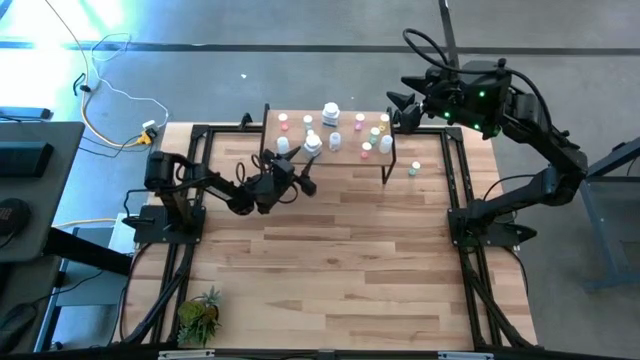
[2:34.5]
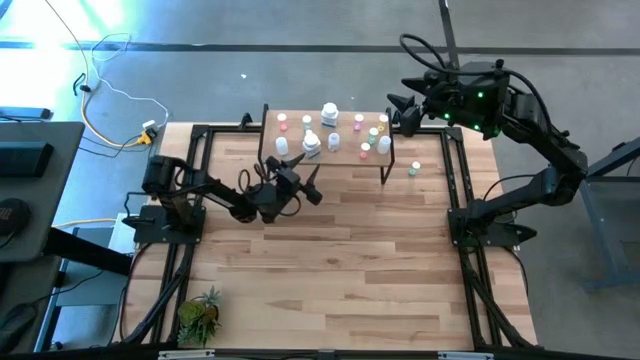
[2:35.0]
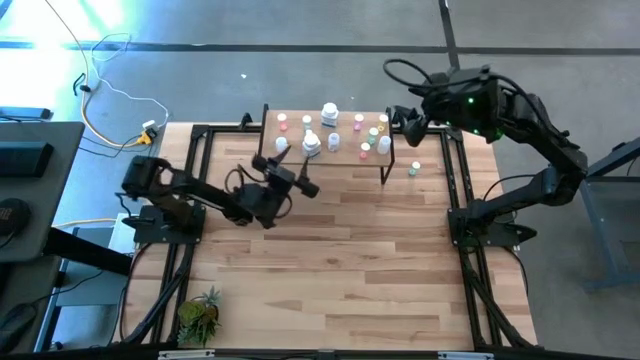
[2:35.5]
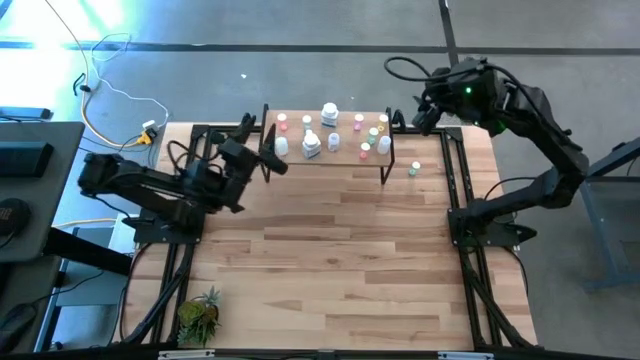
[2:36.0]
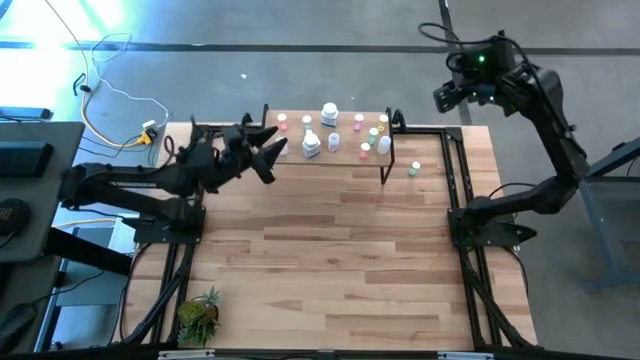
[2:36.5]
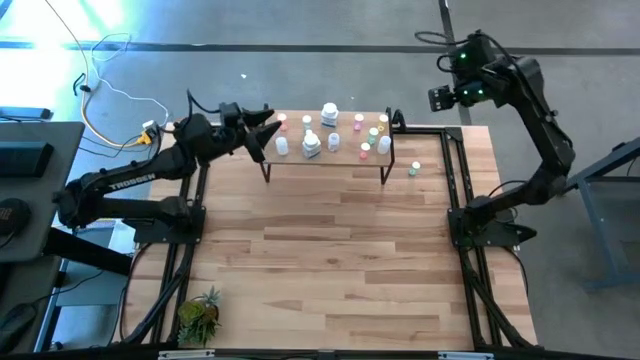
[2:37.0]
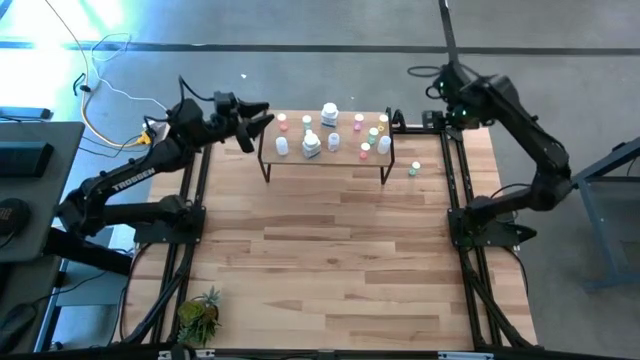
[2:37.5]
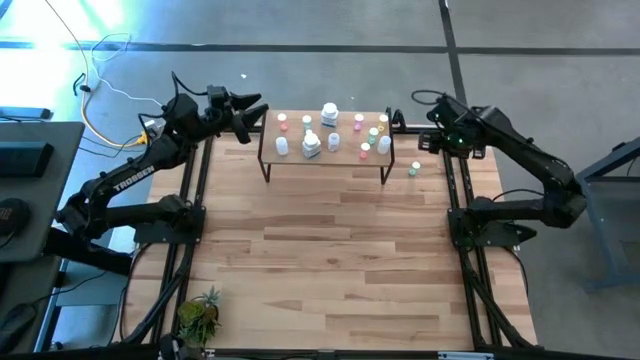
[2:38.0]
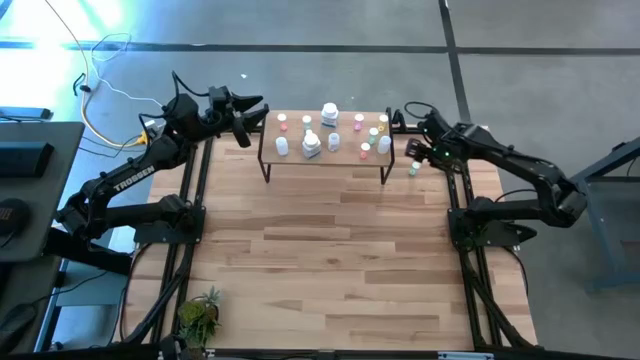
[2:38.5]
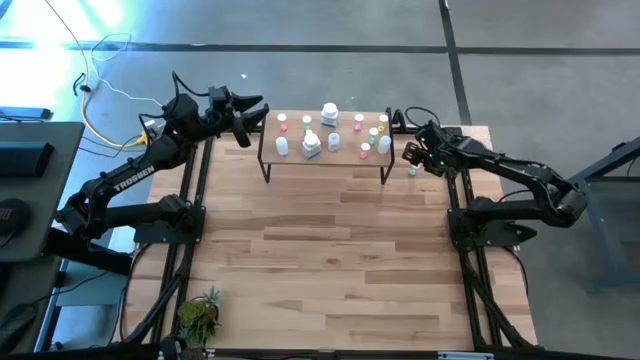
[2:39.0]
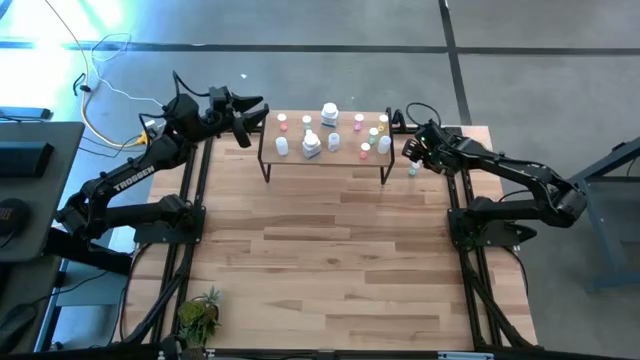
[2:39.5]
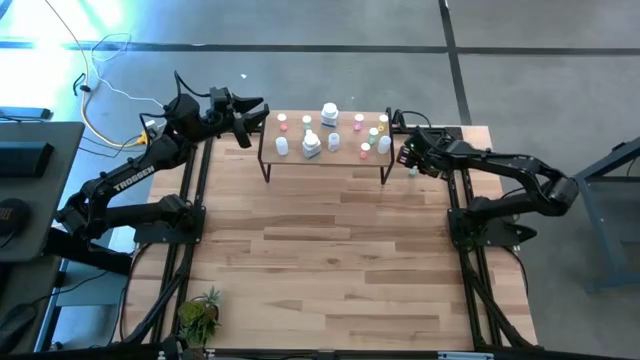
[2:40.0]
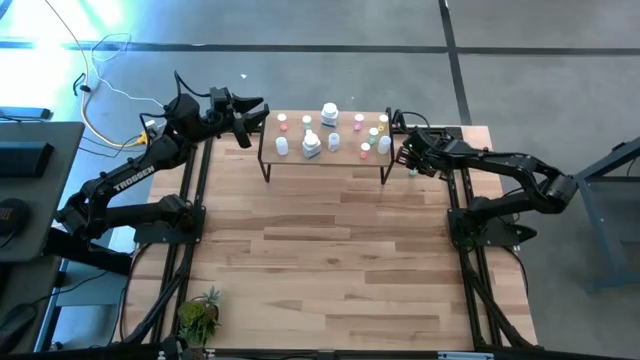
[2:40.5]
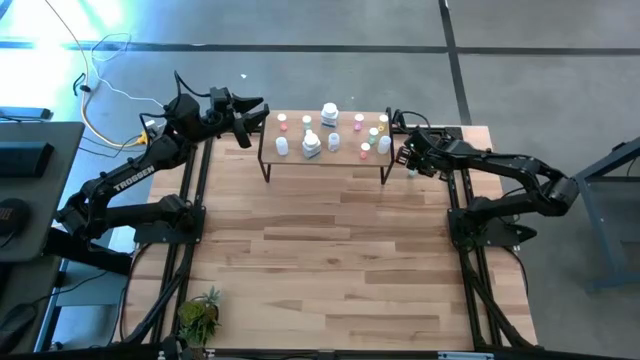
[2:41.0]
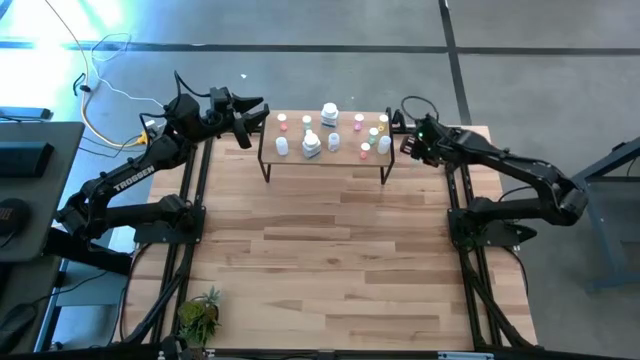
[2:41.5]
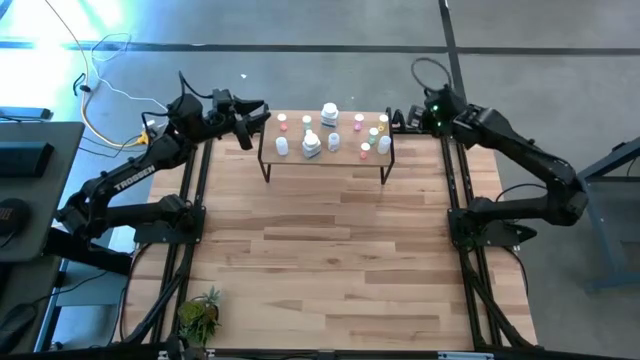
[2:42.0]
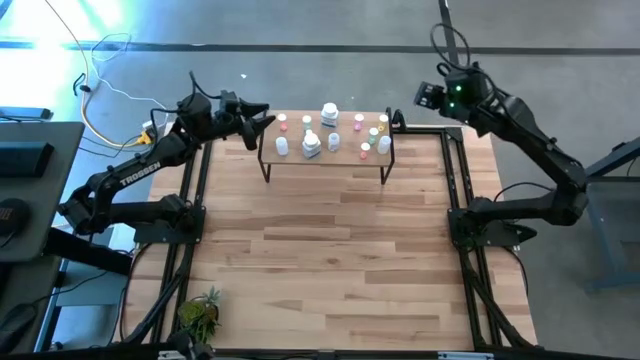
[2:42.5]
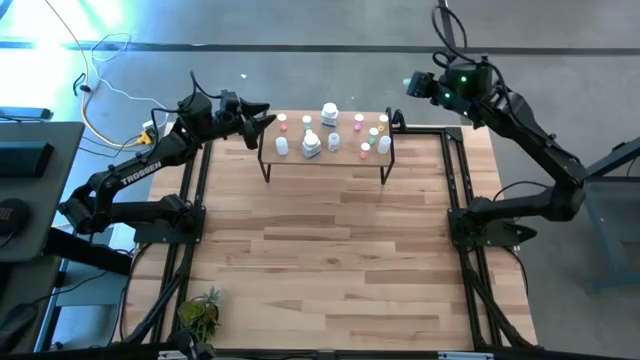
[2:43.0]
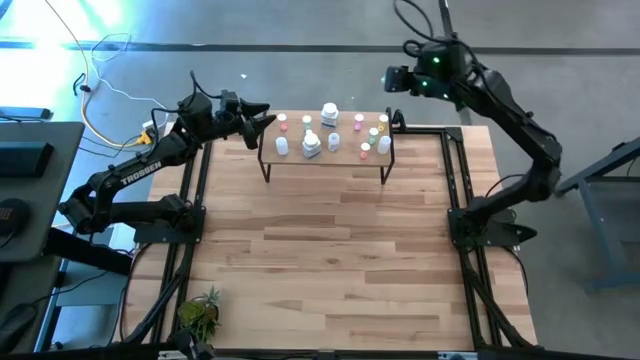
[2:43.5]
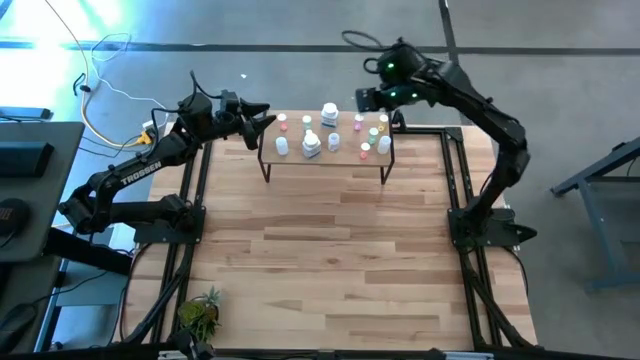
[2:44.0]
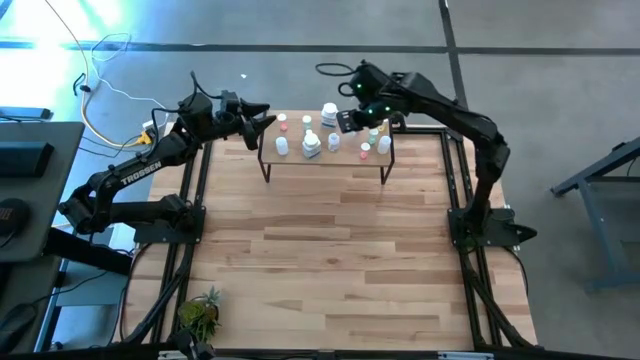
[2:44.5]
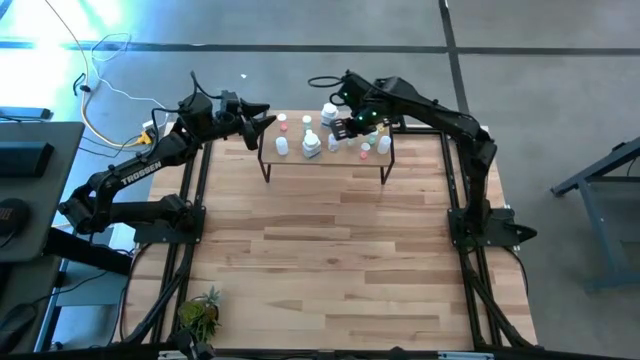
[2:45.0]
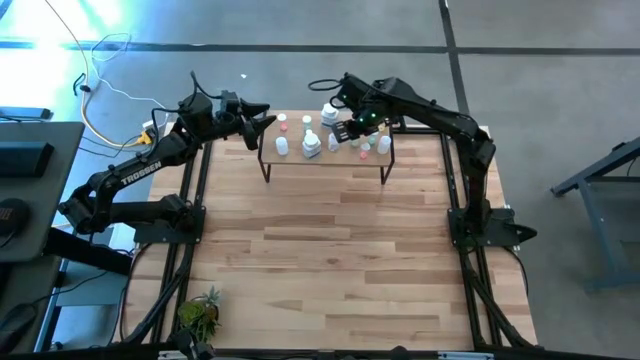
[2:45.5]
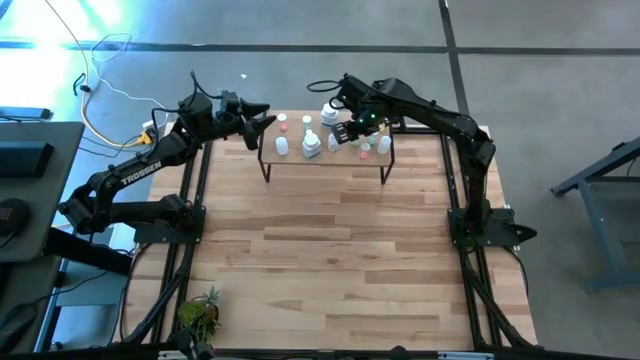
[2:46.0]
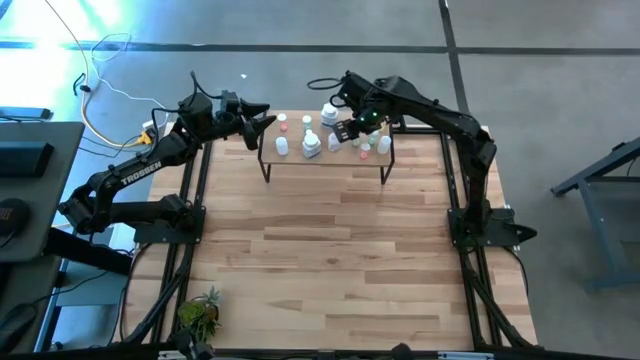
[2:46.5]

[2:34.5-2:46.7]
Task: Pick and place medicine bottles onto shelf by color
Put the blue pill bottle on the shelf

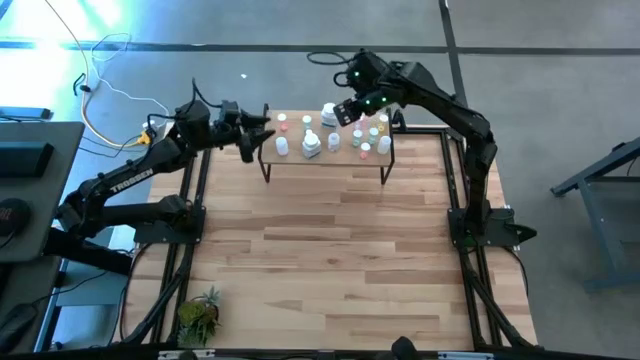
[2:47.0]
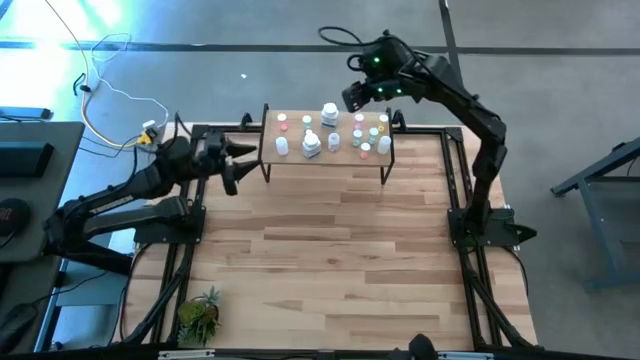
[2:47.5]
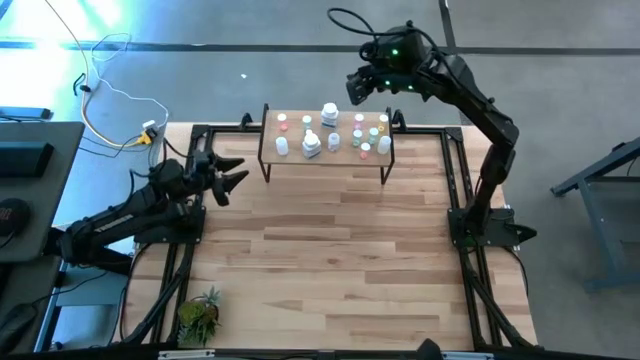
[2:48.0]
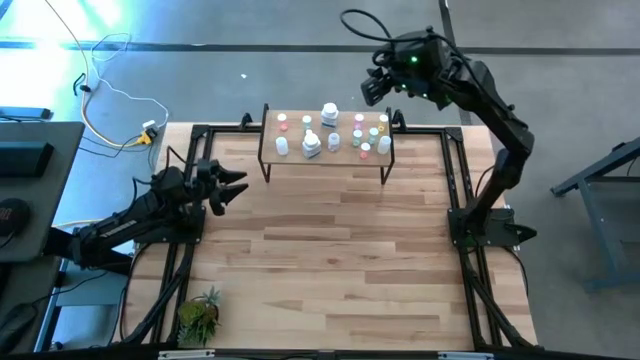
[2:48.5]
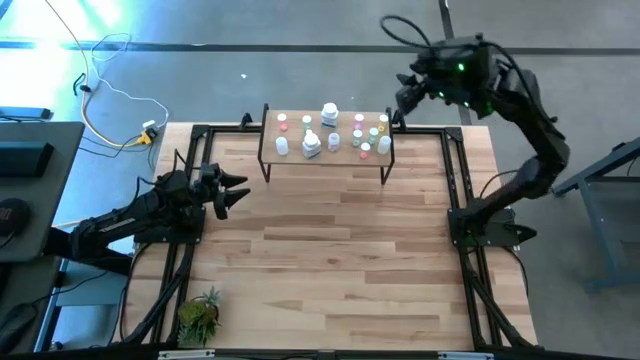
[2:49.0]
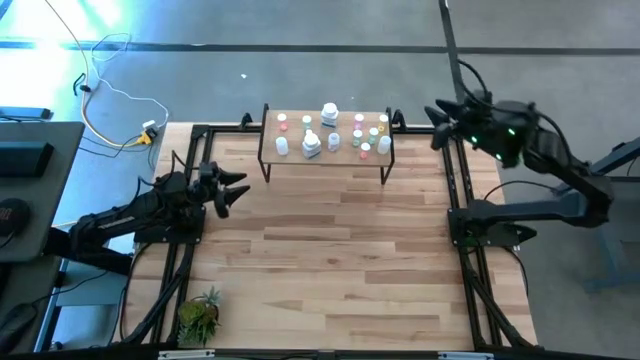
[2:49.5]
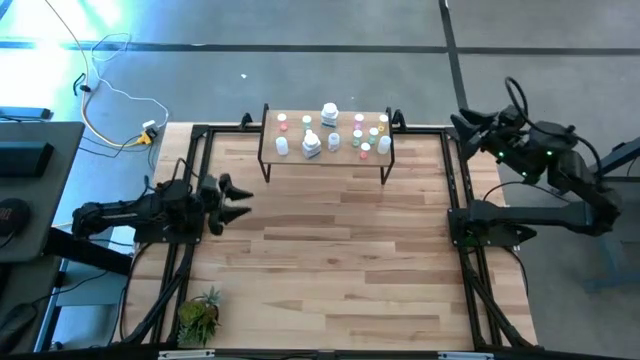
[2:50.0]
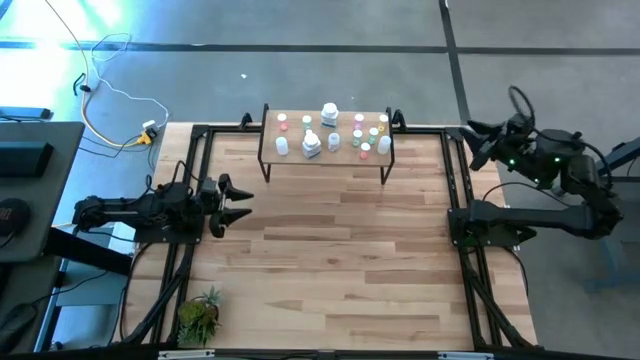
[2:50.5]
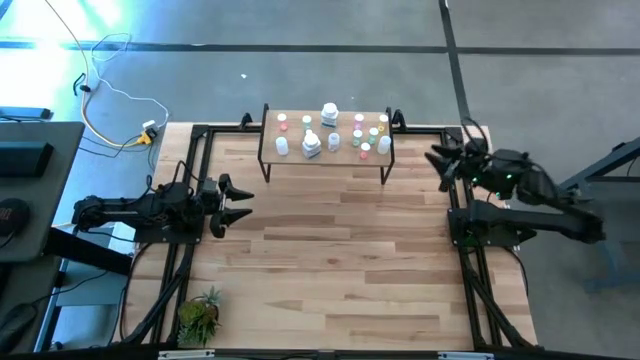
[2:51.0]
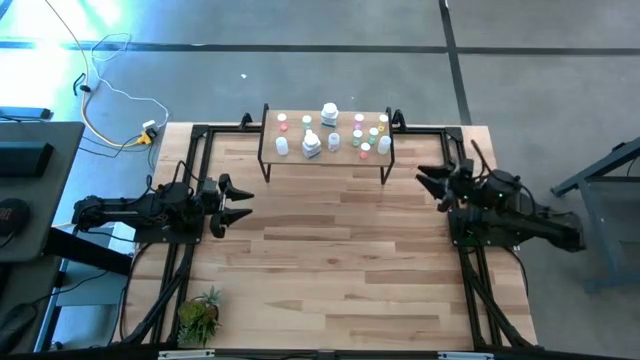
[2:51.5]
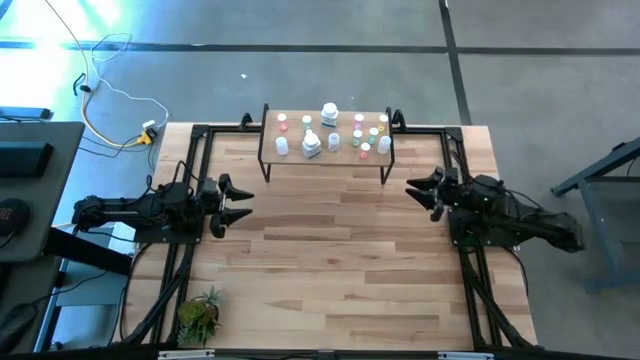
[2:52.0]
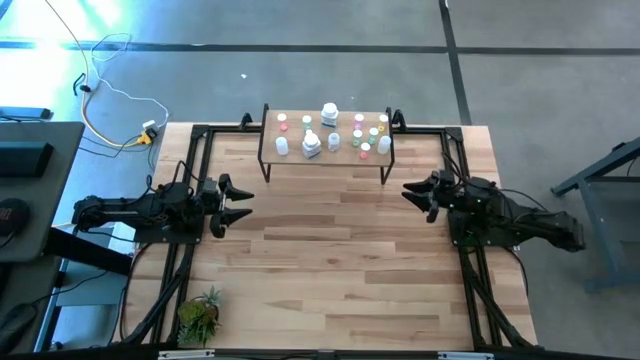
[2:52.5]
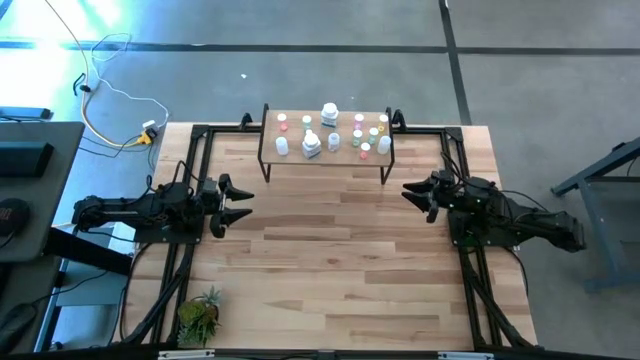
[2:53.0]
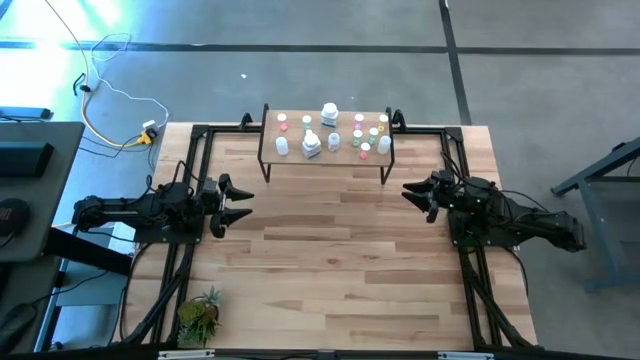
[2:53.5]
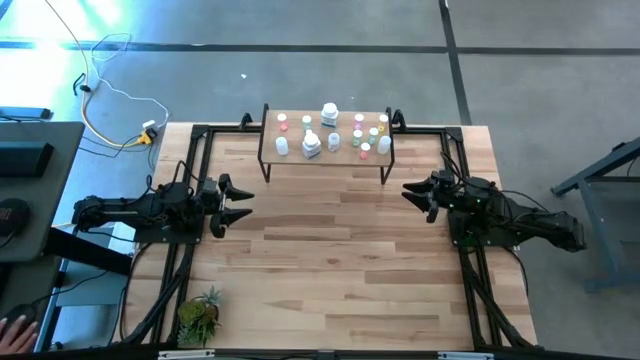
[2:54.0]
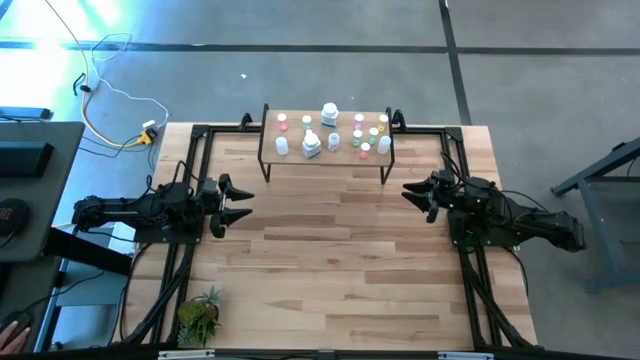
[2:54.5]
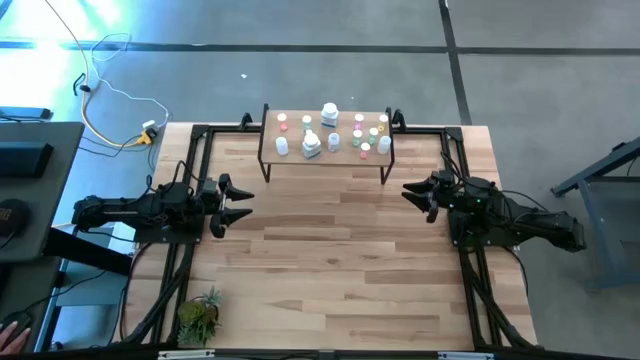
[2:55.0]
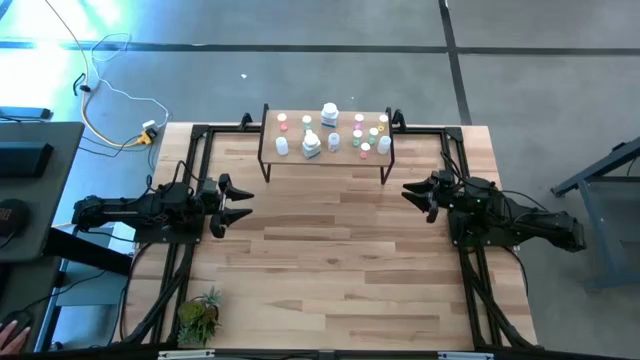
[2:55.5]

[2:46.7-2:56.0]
Return to Home Position
